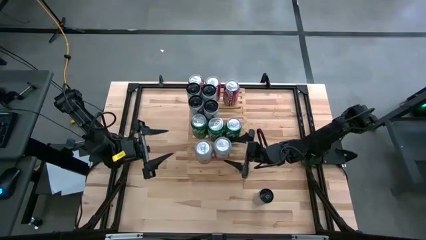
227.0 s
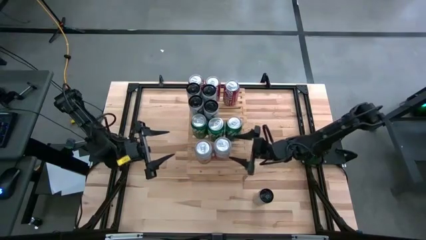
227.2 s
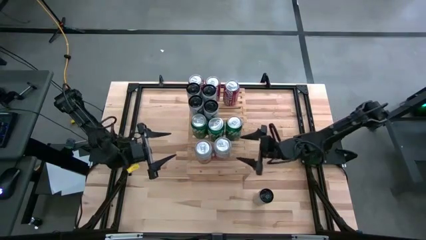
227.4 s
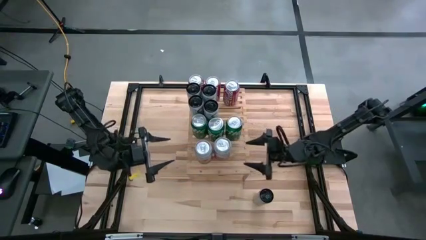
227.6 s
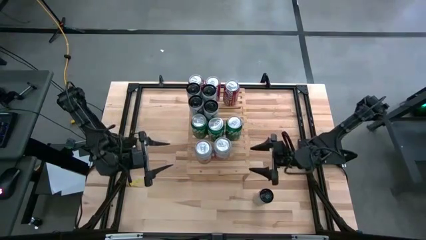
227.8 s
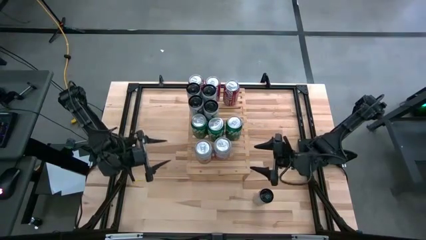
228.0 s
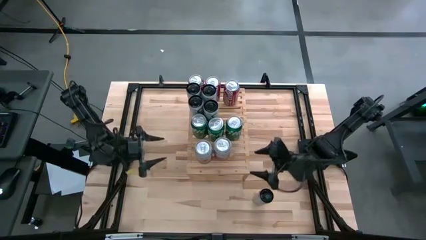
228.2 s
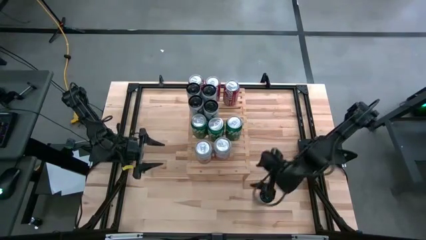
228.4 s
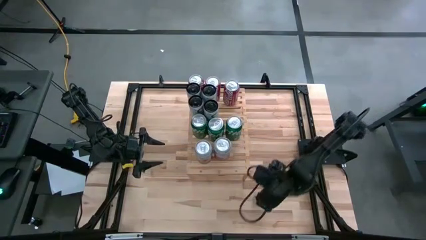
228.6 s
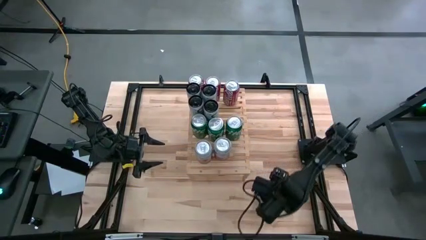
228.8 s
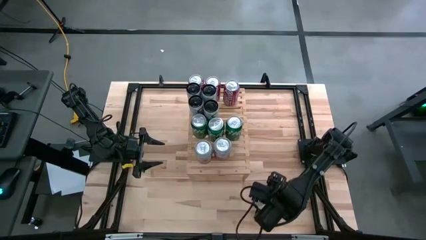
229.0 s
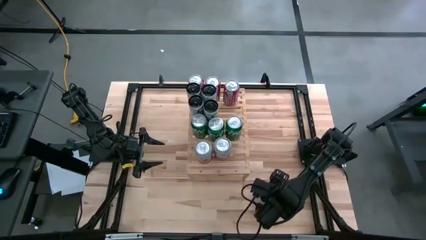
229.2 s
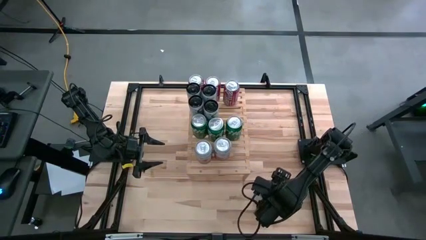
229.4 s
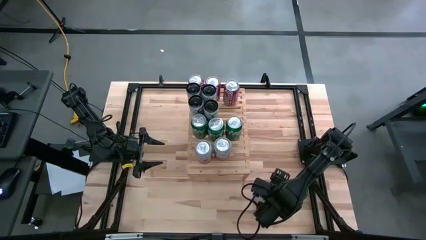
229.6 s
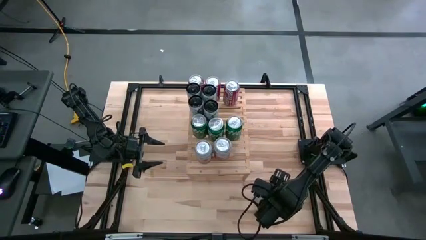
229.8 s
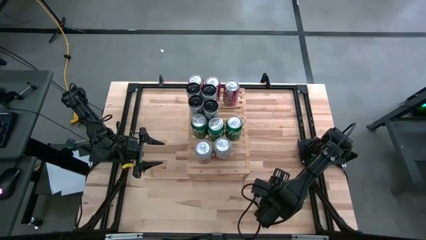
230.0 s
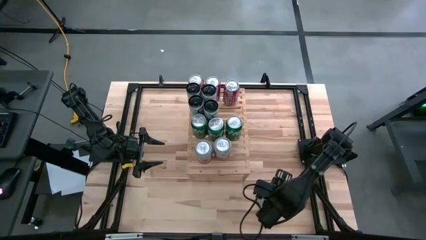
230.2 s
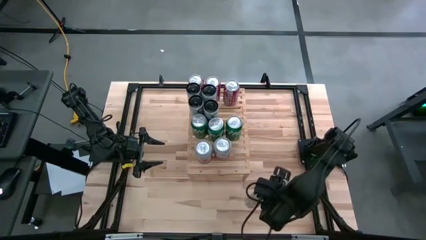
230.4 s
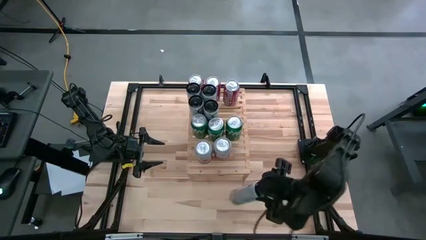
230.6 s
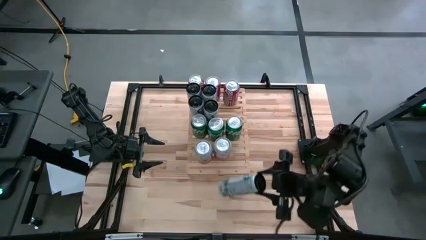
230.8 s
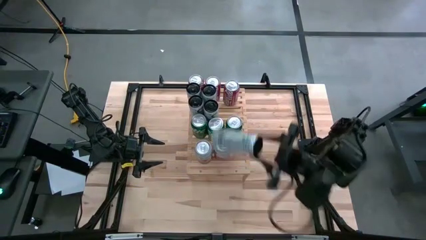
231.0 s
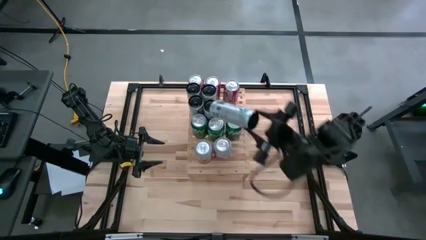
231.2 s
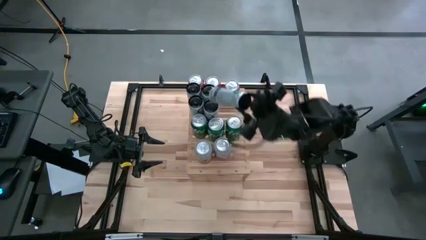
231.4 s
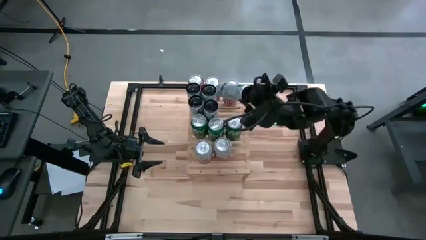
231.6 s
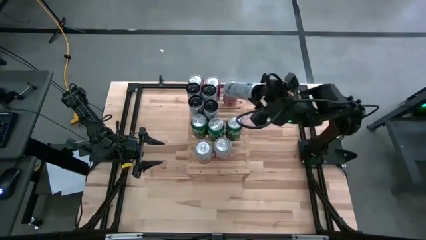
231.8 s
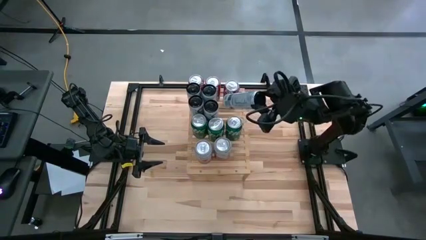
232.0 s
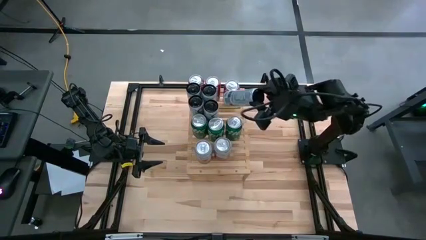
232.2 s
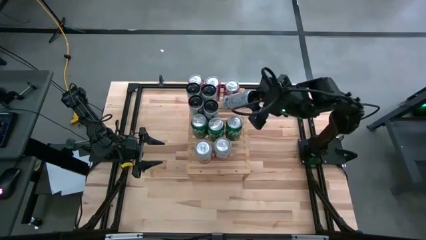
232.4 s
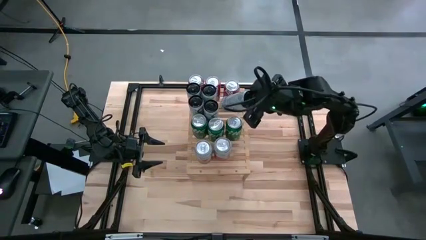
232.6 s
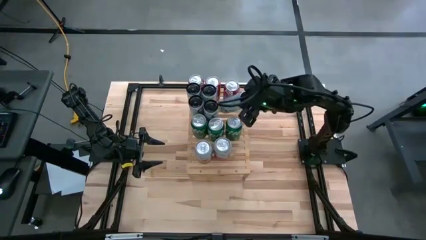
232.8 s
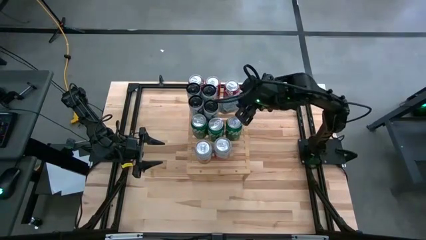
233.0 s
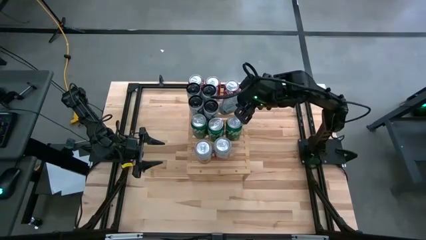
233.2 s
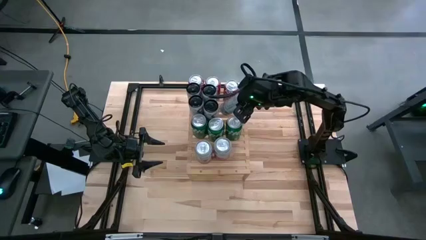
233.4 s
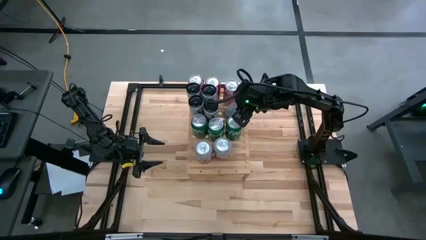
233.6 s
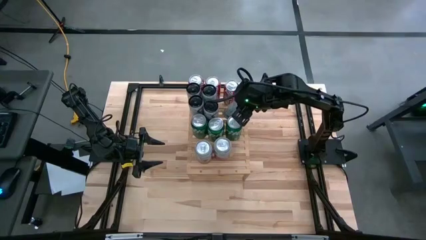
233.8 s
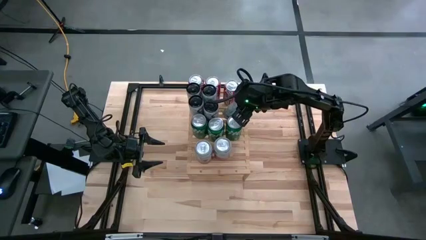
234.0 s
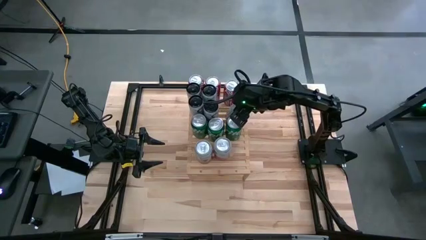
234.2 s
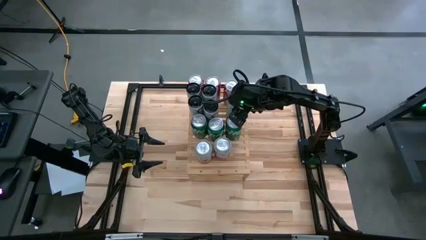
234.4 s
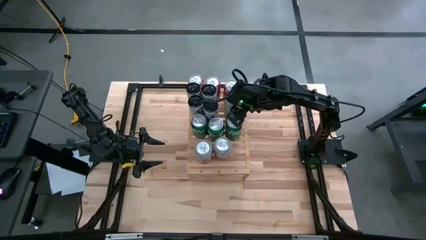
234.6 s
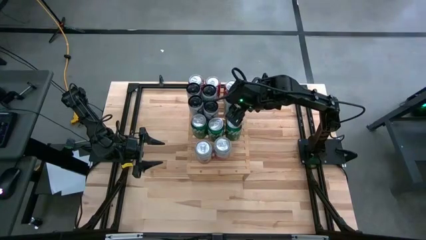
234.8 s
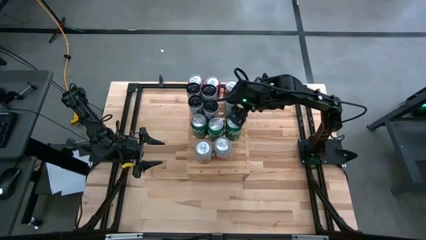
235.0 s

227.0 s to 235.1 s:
Task: Place canned beverage on shelf
Align the peach vibe celsius soda can with the other peach vibe celsius soda can on the shelf

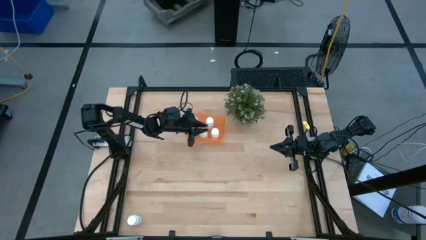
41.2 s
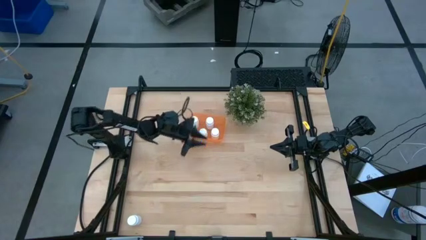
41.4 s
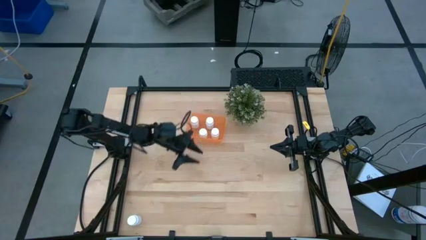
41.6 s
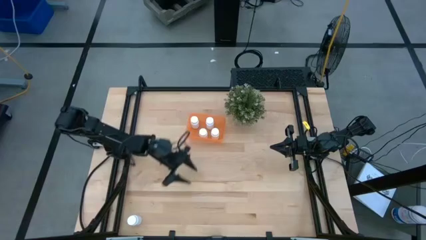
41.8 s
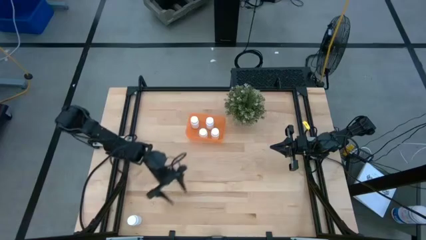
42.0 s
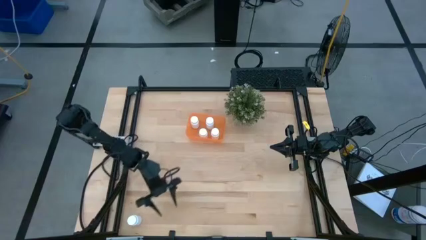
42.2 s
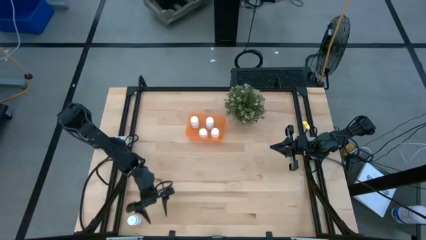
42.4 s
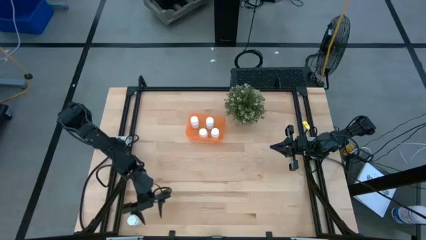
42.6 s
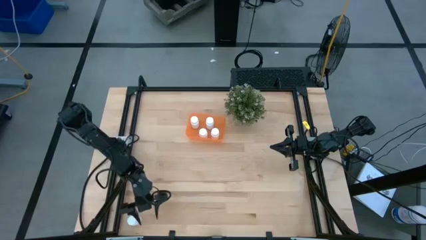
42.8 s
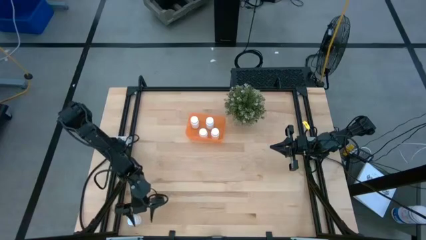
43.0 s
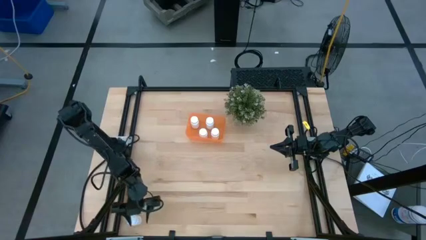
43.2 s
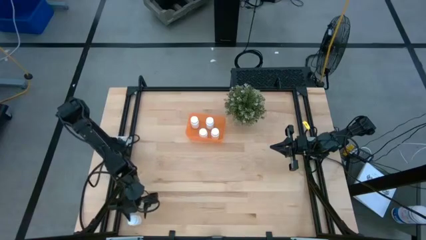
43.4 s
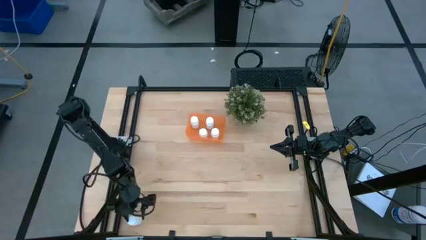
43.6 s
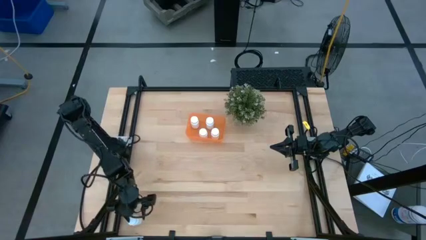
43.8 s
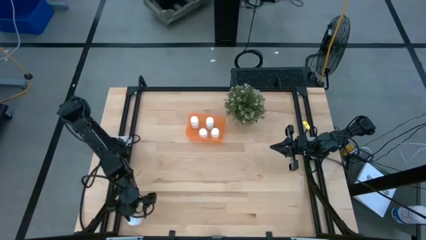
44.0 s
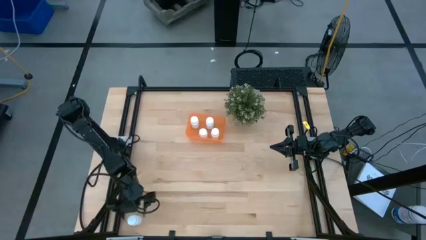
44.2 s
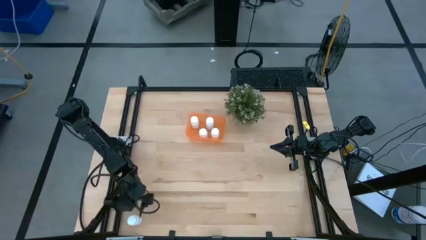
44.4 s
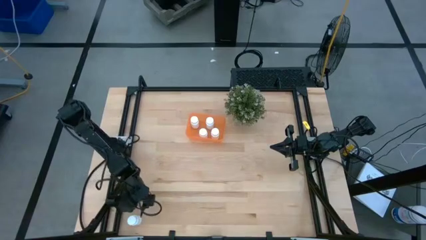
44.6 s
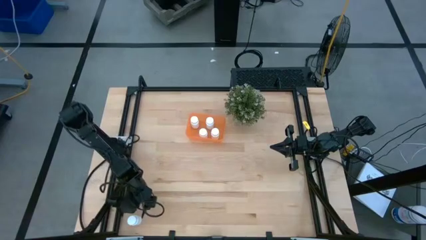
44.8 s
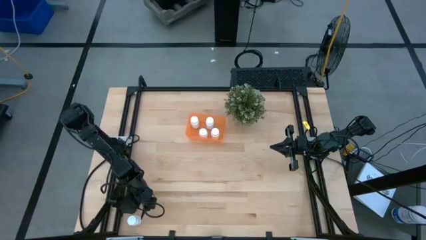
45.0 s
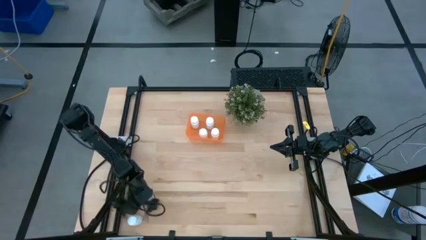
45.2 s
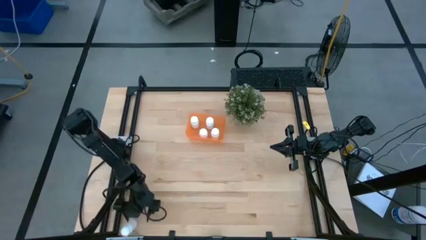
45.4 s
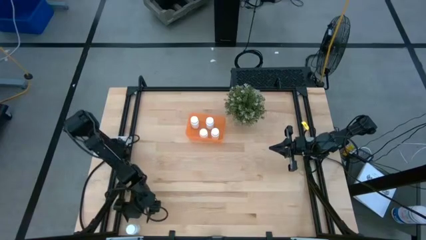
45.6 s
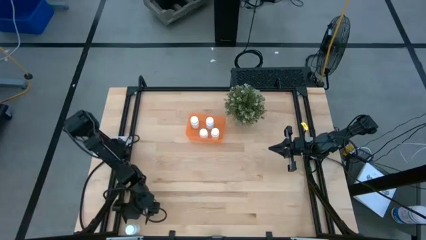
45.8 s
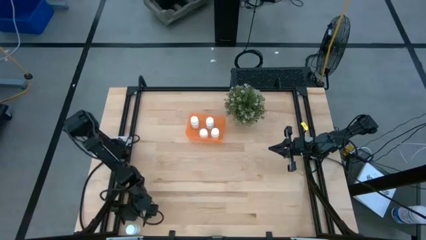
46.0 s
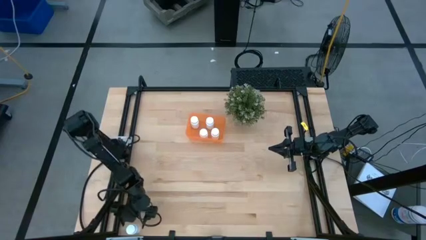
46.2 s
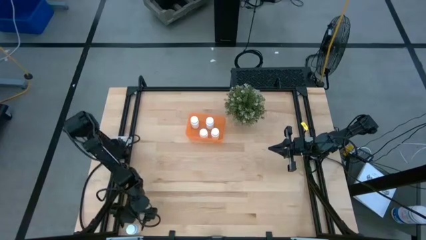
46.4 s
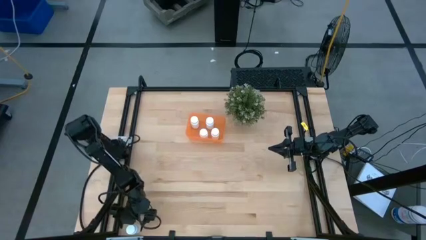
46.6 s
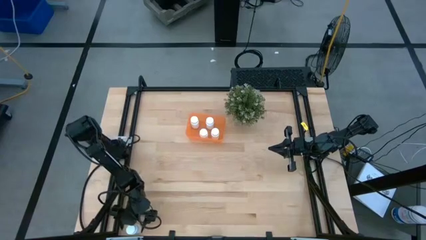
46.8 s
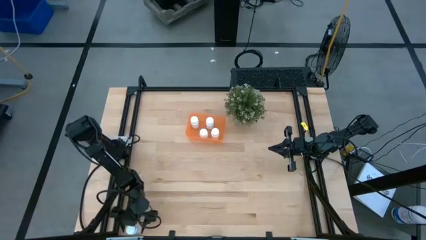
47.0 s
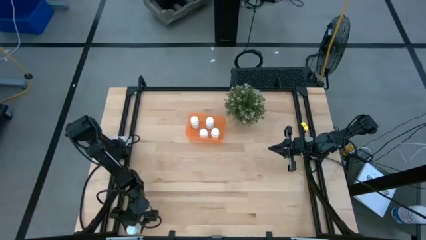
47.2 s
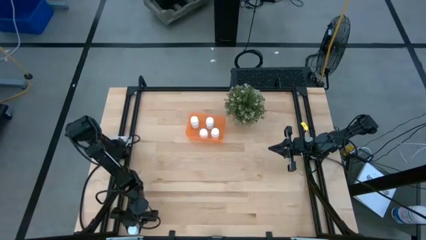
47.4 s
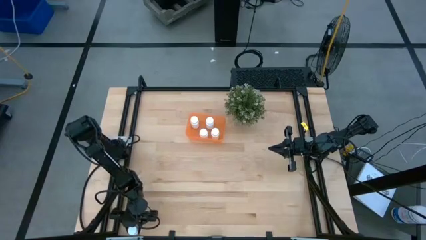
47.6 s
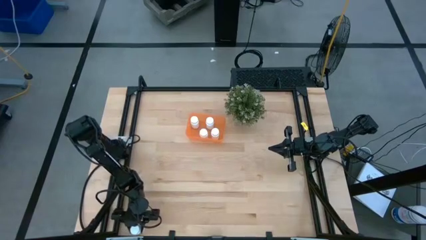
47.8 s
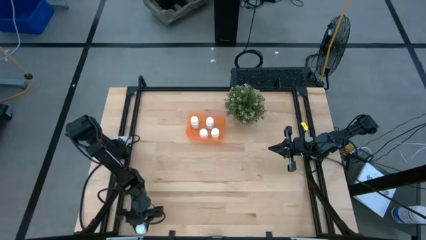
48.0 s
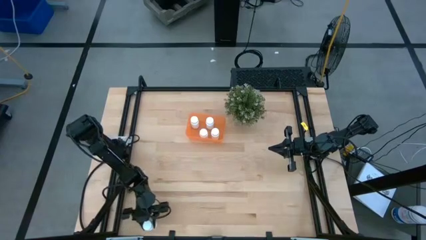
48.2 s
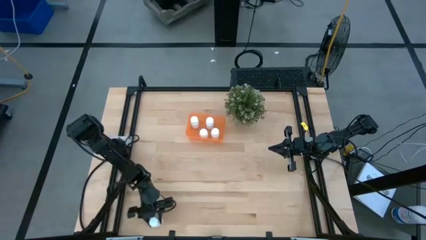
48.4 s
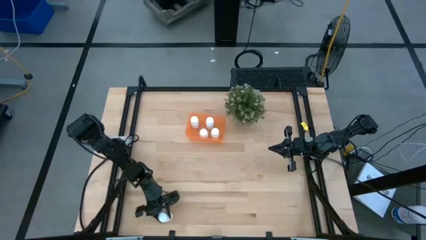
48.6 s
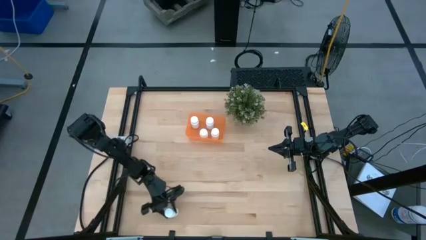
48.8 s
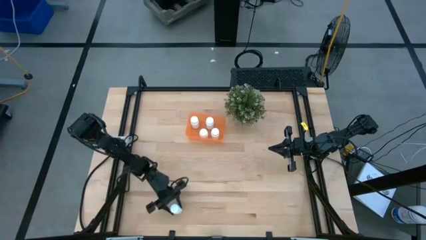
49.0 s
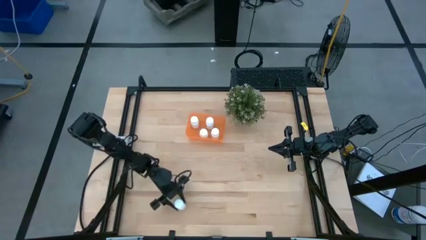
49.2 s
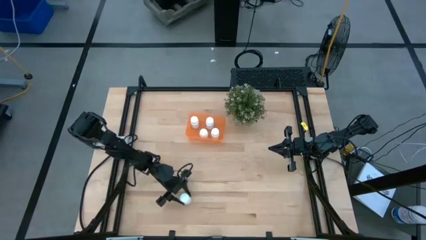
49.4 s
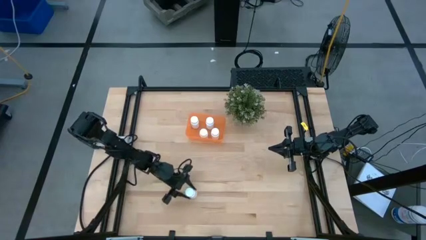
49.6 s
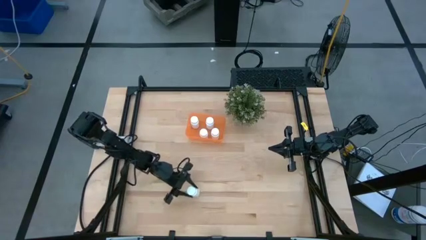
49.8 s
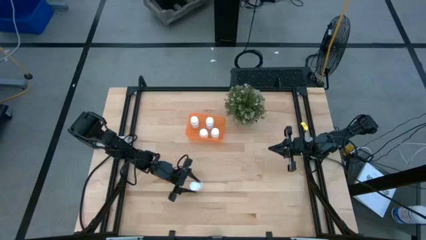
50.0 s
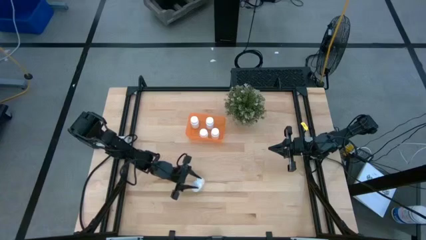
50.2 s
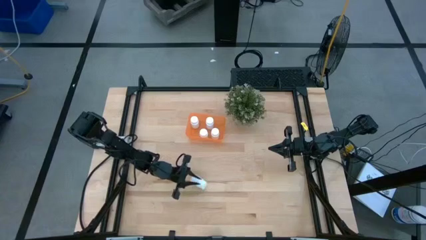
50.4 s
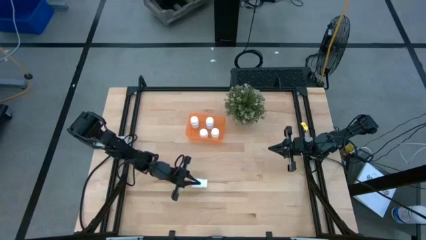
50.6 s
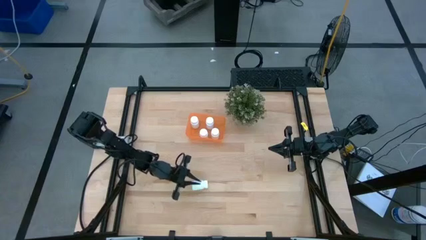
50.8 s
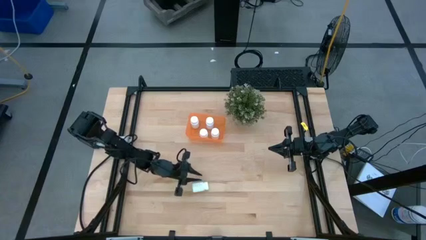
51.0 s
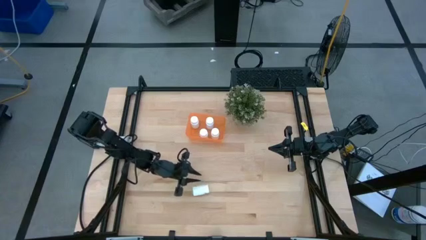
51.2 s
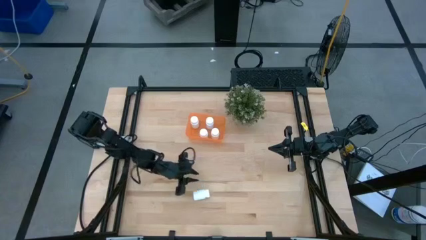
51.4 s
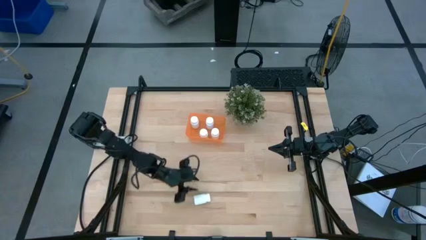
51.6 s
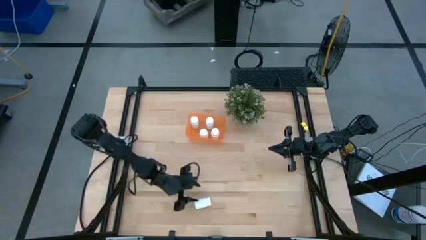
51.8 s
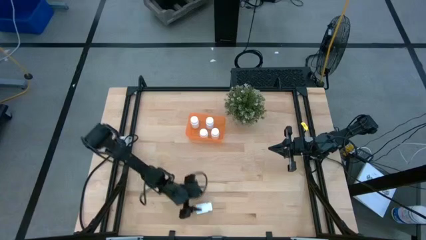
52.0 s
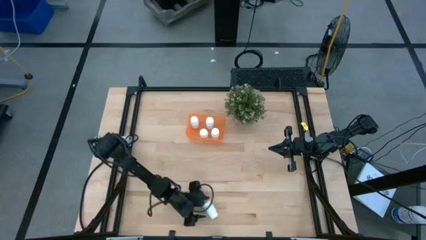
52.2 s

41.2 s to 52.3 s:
Task: Pick and place pill bottles into a basket
Put the white pill bottle into the orange bin
